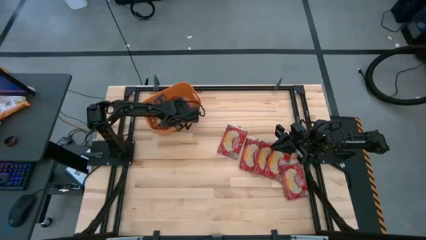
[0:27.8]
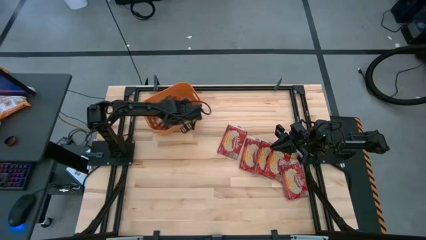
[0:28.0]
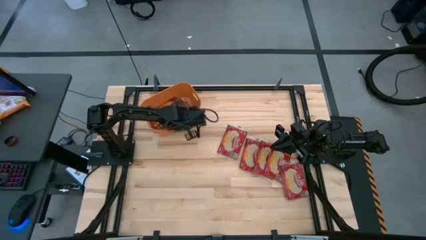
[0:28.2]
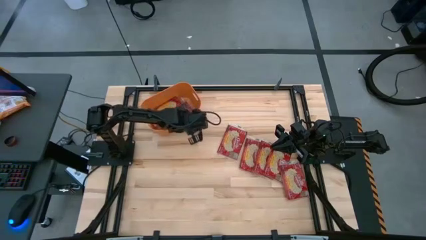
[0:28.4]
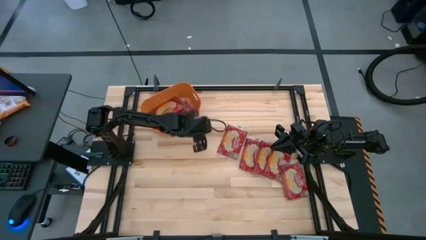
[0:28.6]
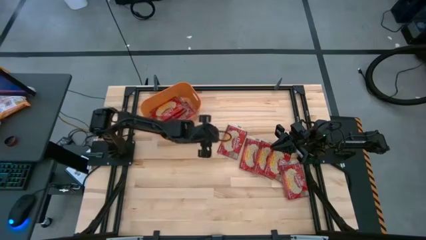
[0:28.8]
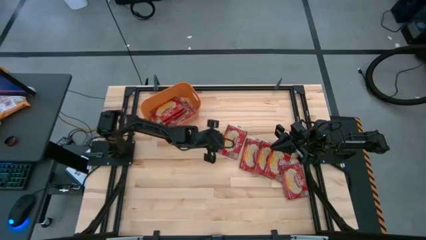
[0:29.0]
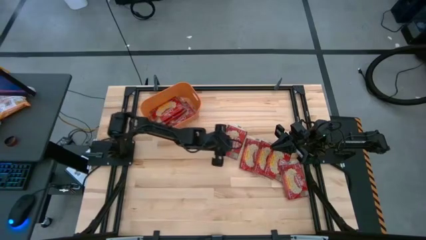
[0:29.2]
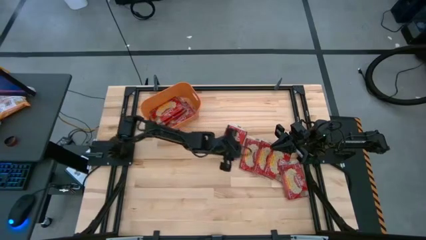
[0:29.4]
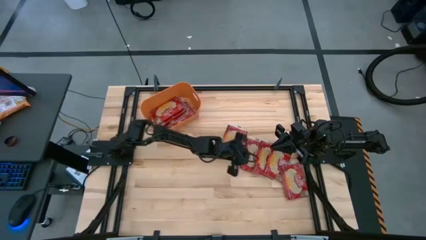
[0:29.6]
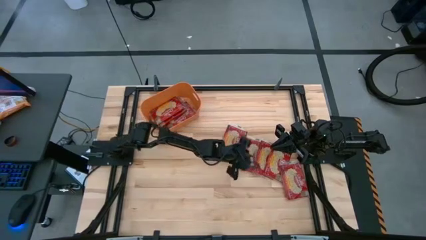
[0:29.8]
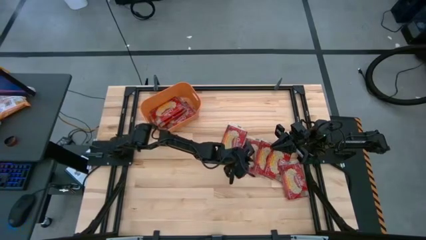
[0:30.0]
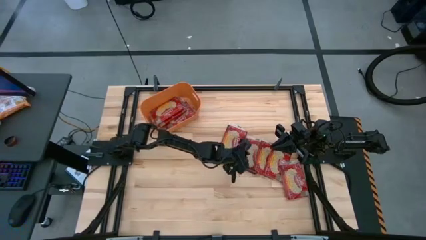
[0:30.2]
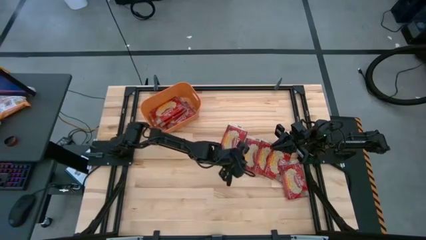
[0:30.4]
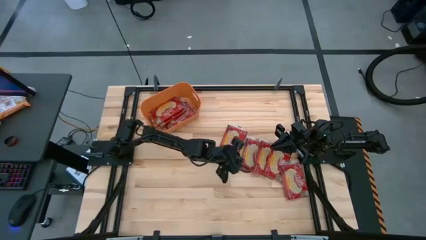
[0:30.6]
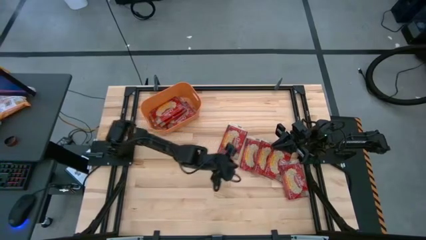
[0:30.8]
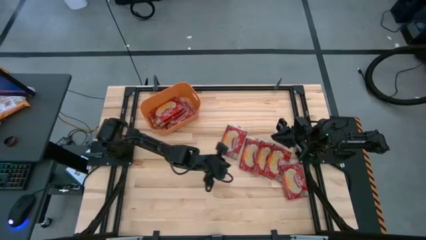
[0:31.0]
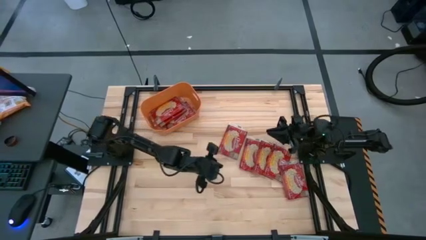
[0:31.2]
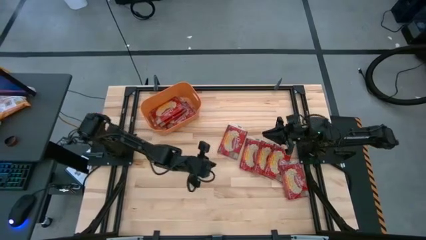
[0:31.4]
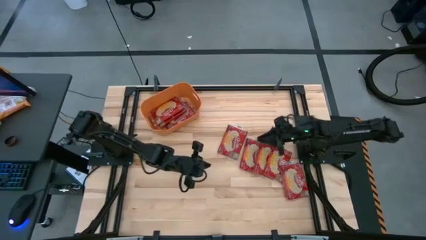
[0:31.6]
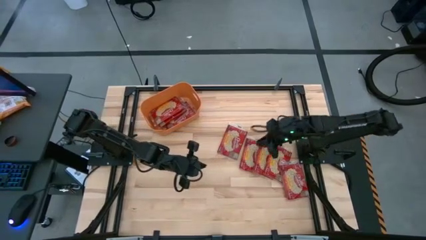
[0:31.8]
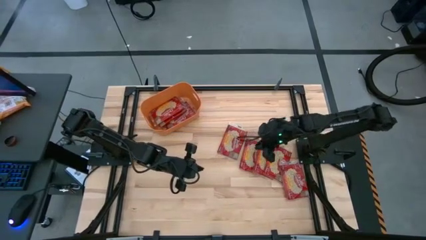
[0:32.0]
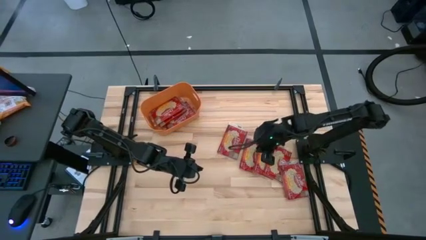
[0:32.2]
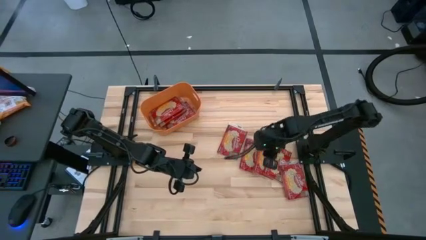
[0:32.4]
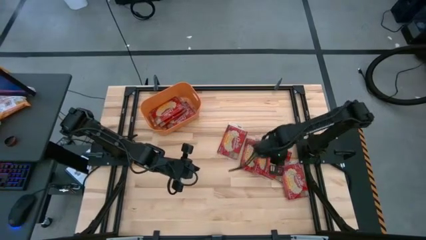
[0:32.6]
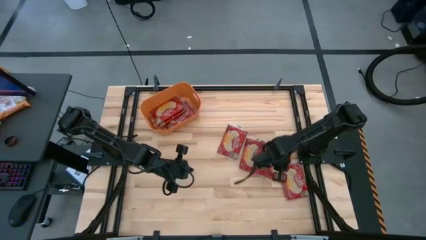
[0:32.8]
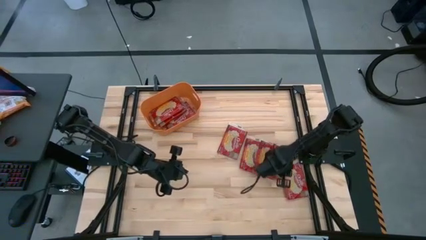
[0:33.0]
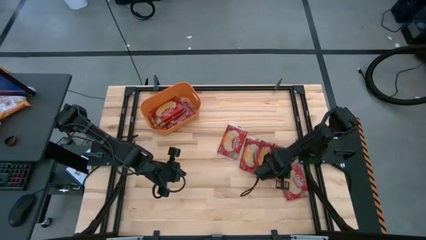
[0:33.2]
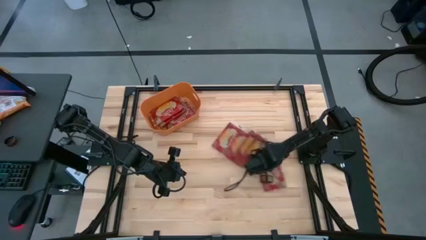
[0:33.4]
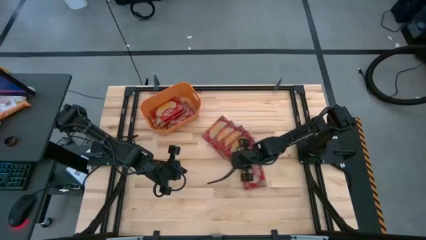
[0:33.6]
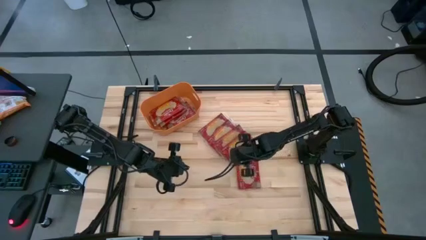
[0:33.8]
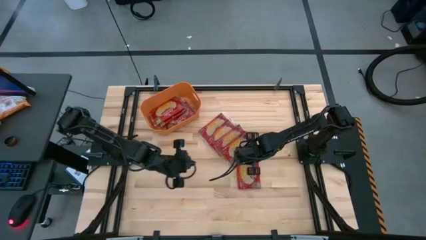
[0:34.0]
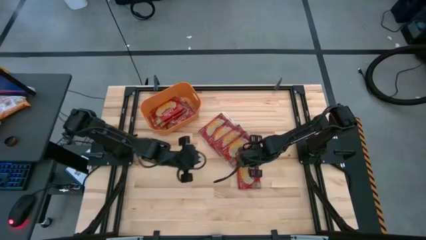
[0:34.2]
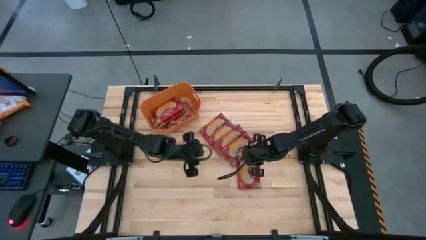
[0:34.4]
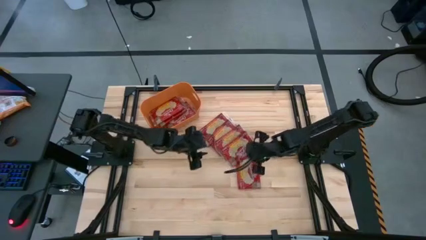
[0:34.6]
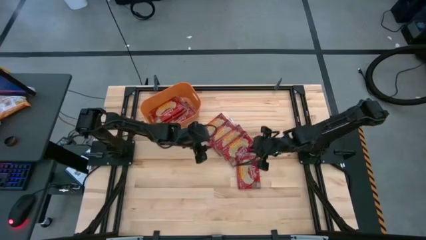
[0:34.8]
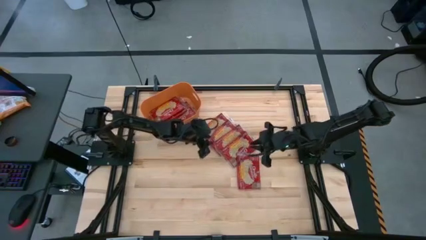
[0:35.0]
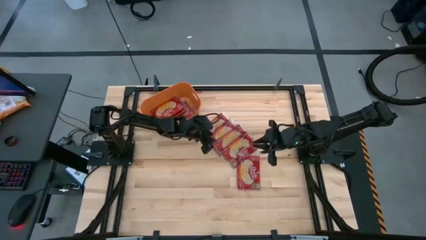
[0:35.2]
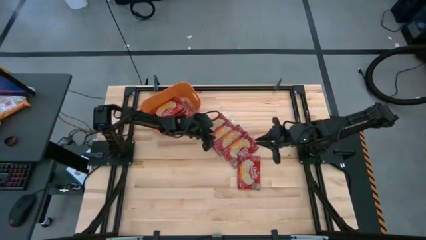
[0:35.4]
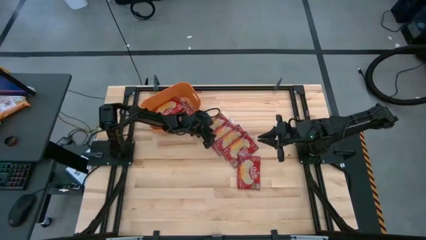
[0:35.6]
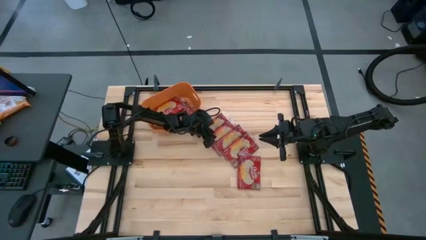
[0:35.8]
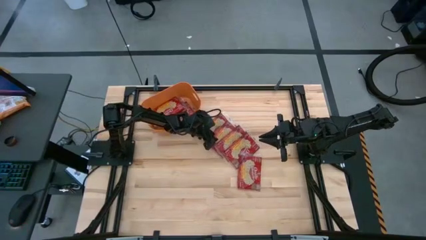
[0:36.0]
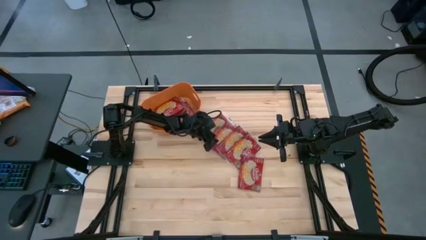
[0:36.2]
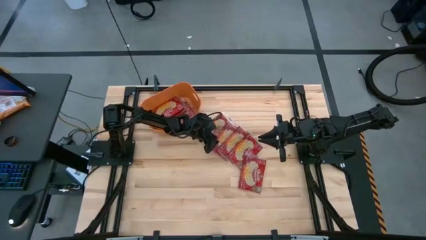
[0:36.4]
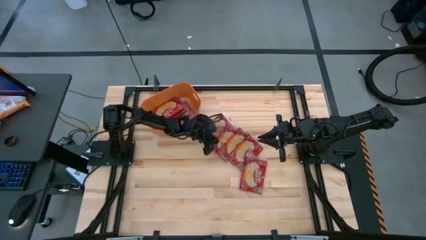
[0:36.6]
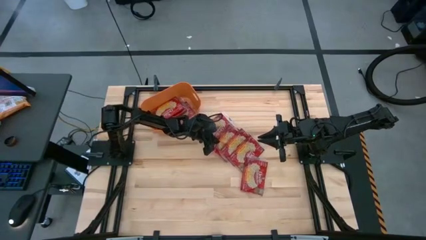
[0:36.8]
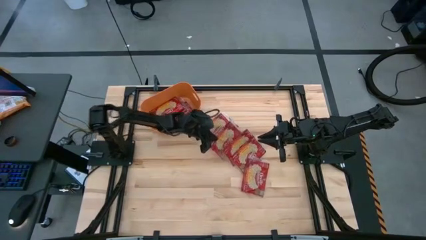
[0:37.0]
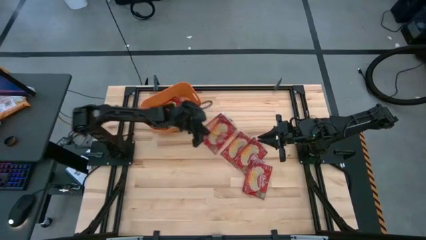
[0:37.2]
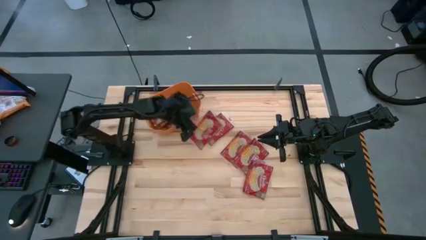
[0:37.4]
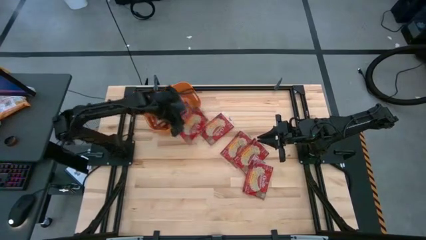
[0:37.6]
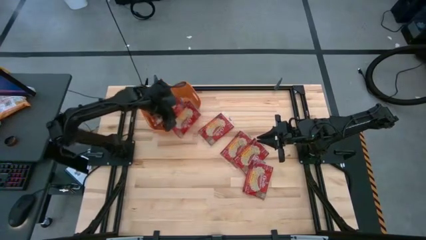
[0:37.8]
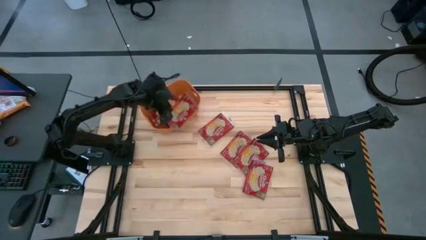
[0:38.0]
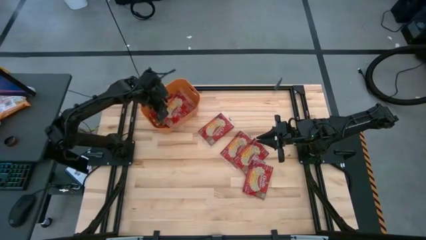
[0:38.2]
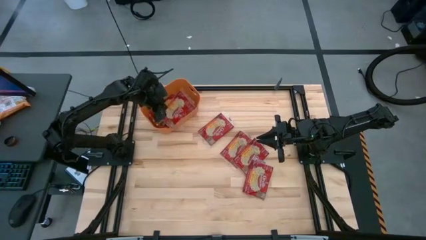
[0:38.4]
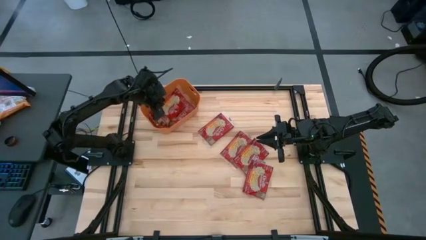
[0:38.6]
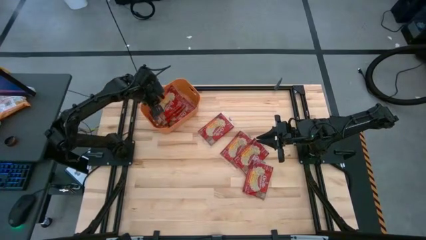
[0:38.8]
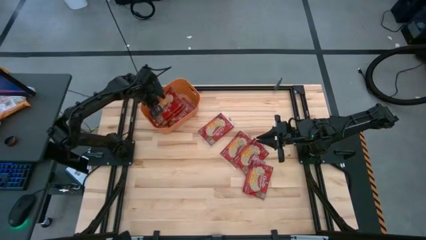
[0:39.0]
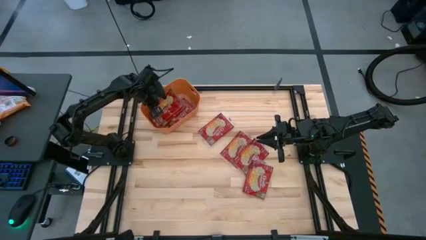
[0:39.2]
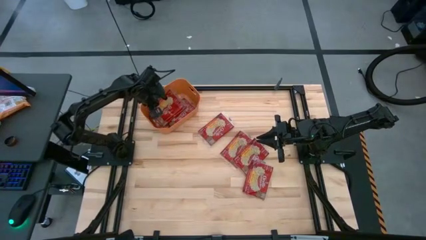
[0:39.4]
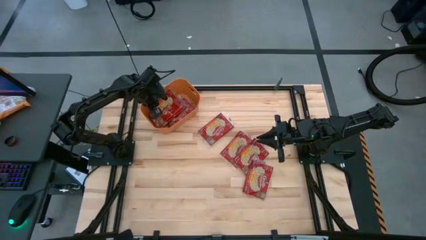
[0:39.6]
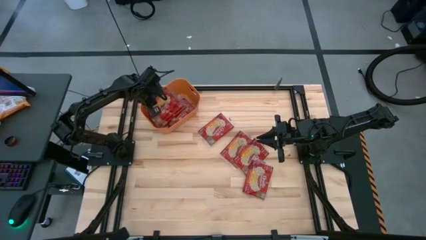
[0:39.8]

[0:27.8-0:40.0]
Task: Sort popcorn bags into baskets
Put the red popcorn pack into the orange bin

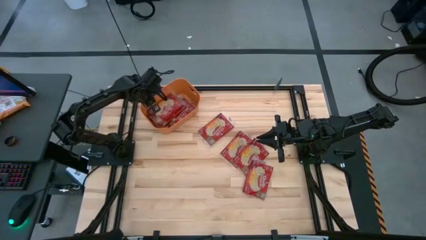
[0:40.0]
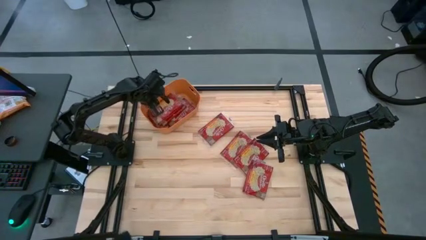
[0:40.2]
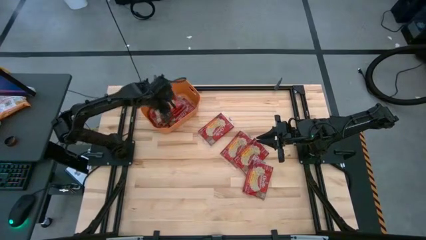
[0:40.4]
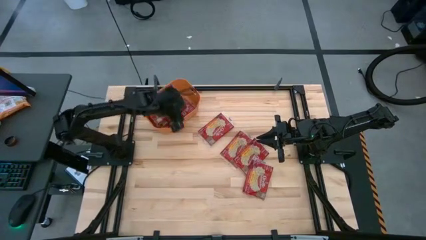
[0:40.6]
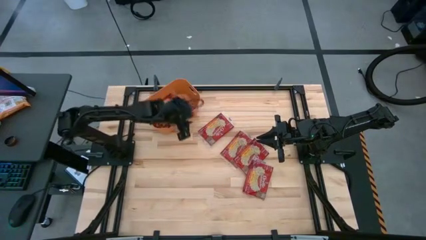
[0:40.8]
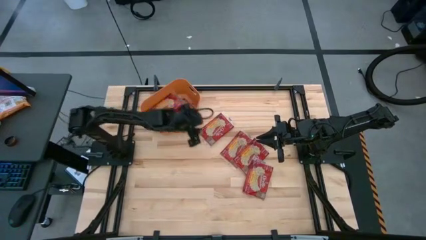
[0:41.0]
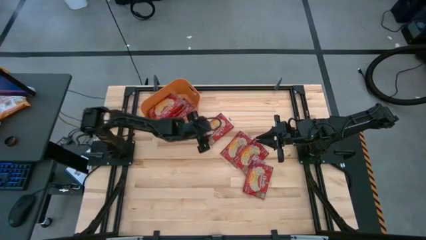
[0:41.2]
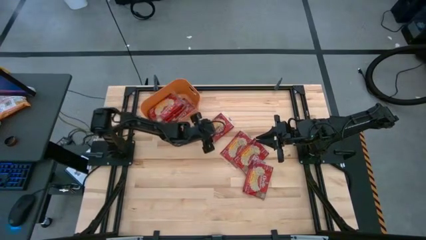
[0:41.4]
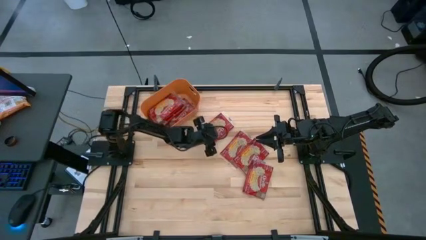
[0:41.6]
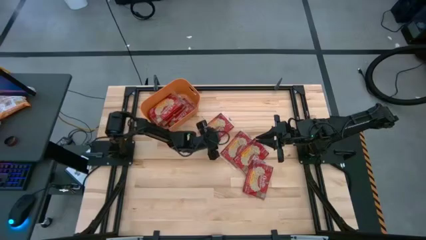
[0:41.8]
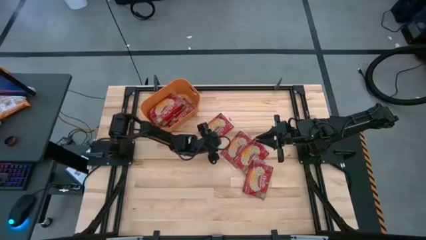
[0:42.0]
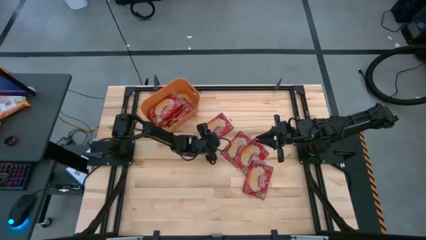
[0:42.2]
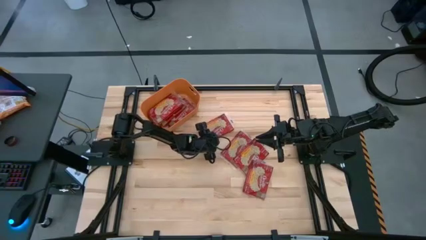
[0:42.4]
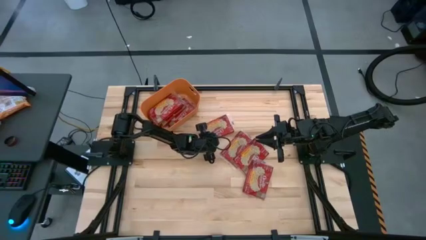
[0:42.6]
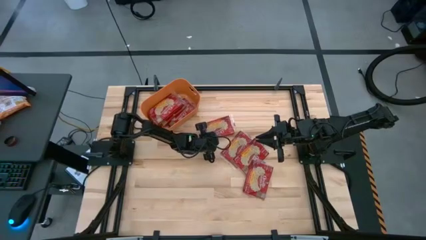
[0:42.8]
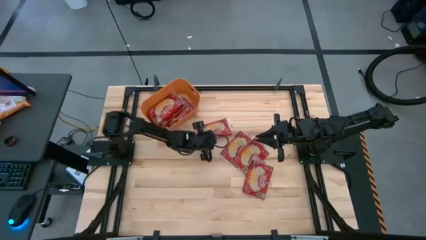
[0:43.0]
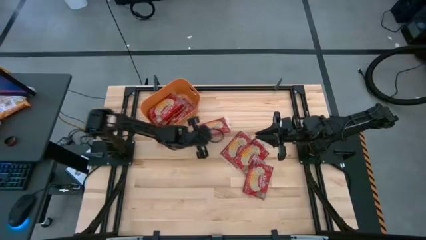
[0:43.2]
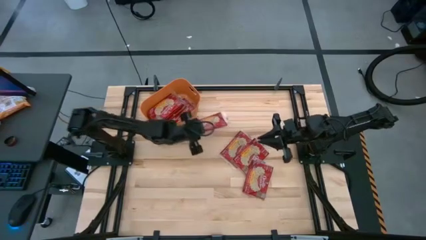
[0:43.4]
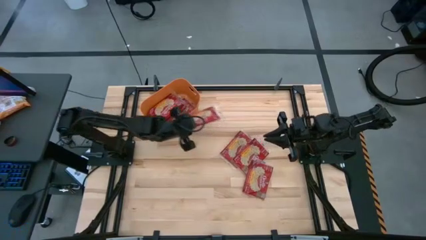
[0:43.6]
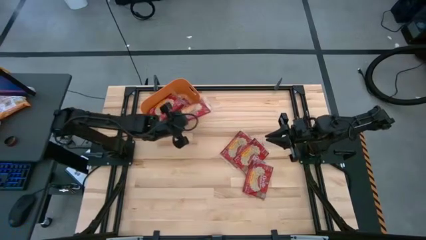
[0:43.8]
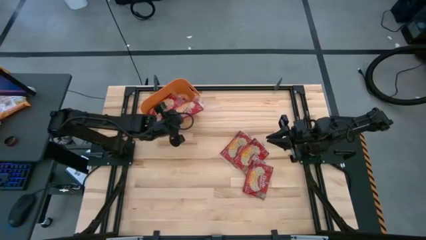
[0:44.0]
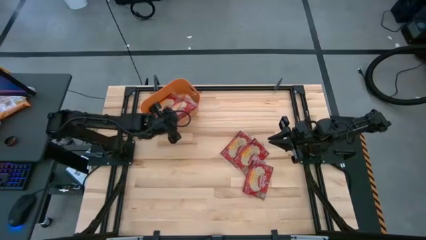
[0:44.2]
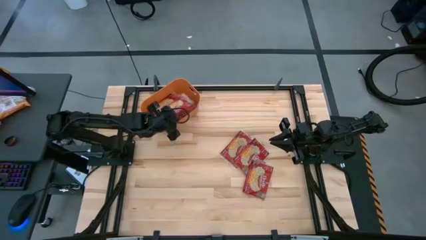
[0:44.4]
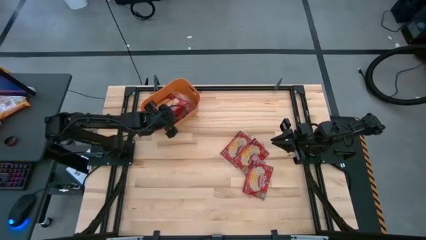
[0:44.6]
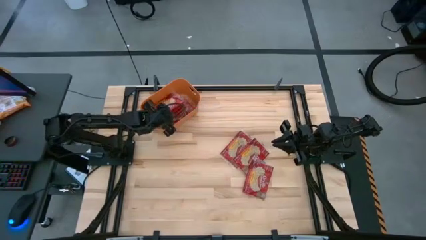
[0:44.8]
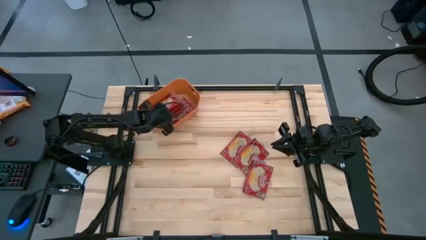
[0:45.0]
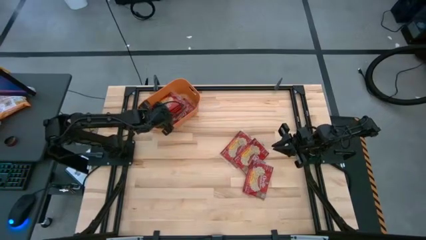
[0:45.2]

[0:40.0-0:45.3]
Put the red popcorn pack into the orange bin
